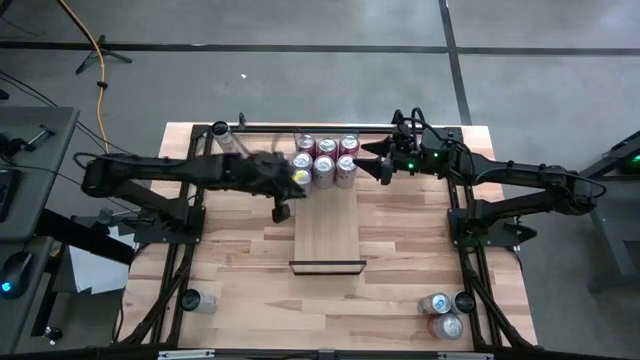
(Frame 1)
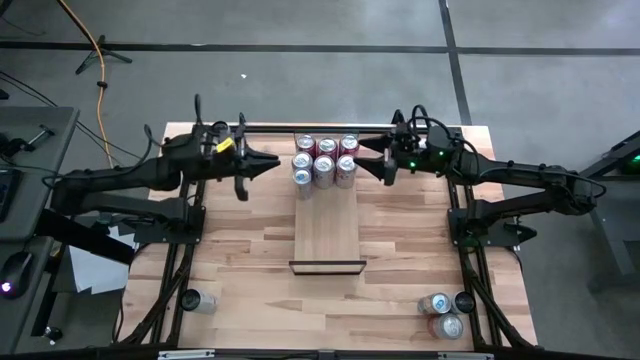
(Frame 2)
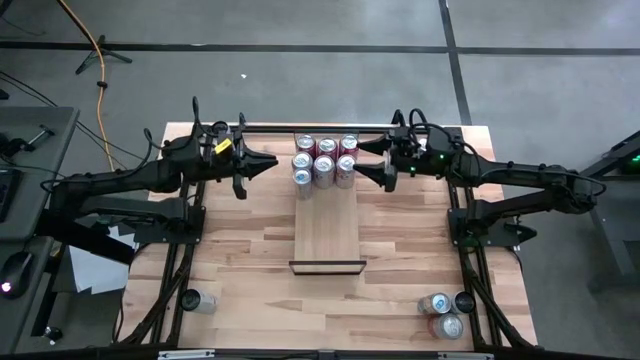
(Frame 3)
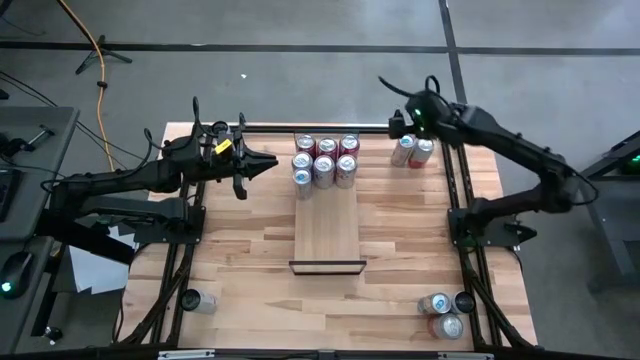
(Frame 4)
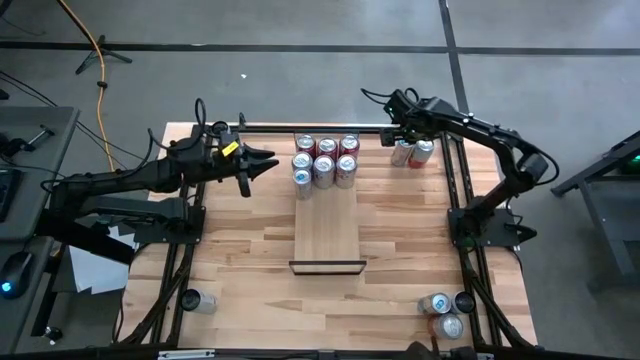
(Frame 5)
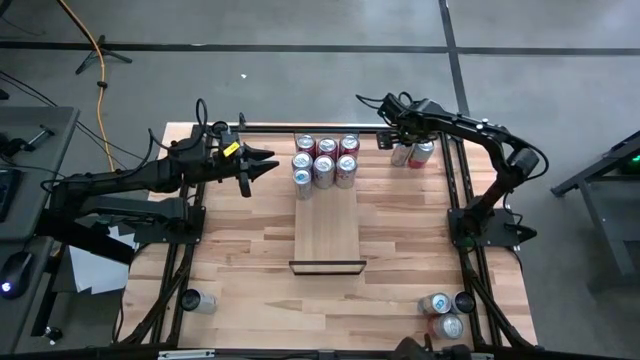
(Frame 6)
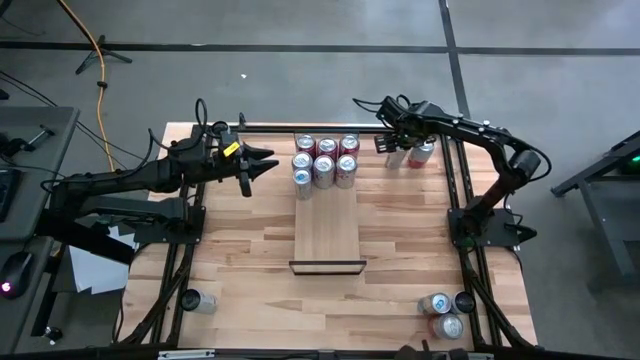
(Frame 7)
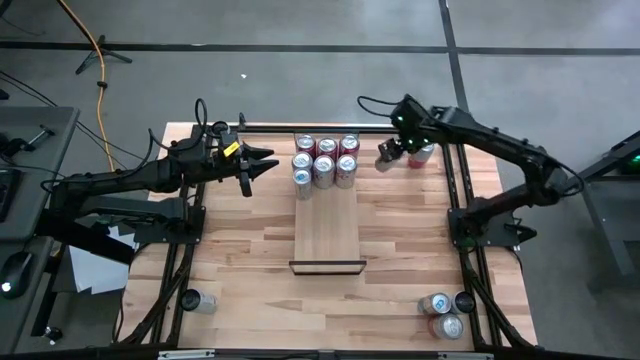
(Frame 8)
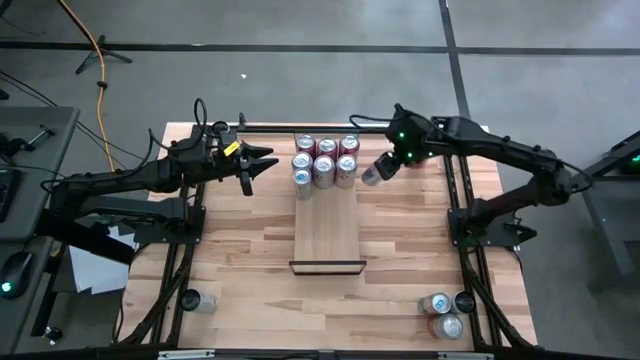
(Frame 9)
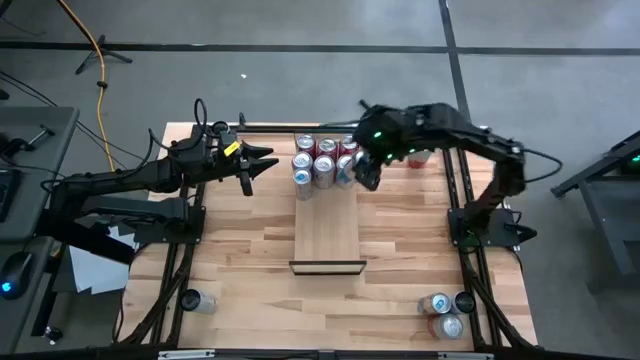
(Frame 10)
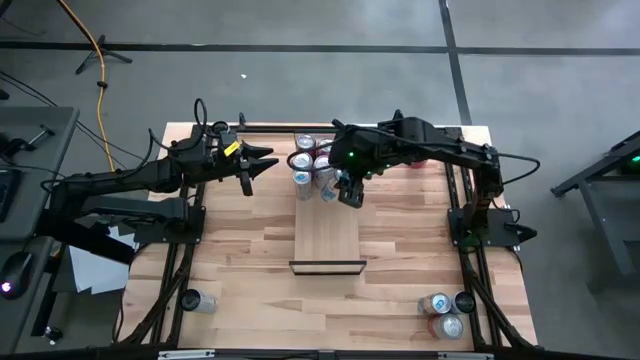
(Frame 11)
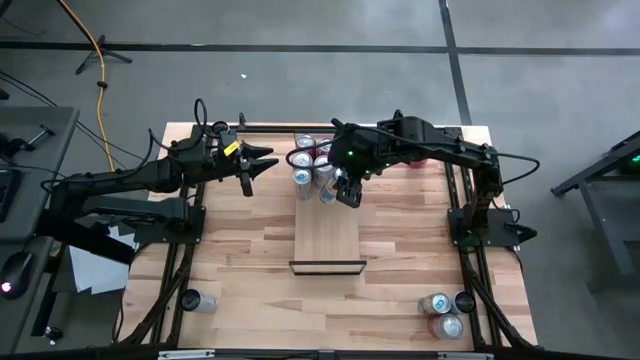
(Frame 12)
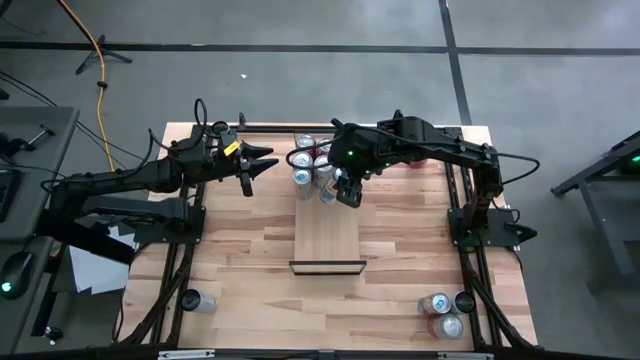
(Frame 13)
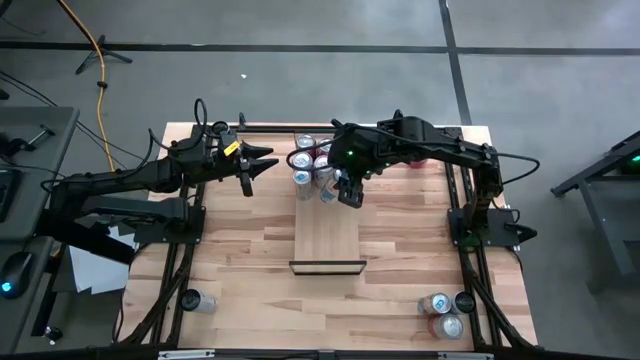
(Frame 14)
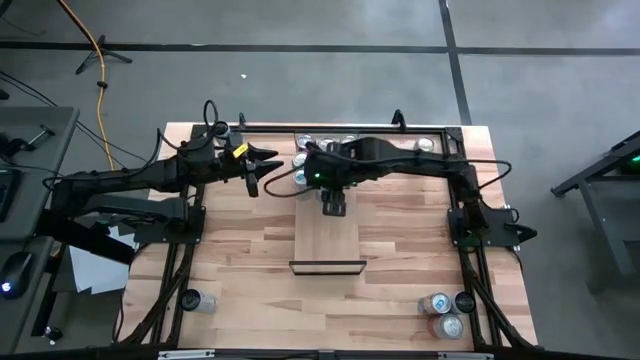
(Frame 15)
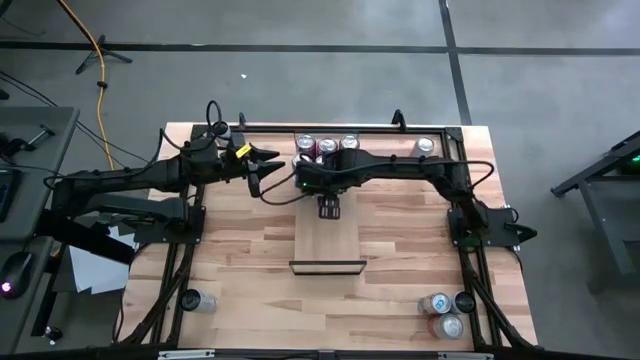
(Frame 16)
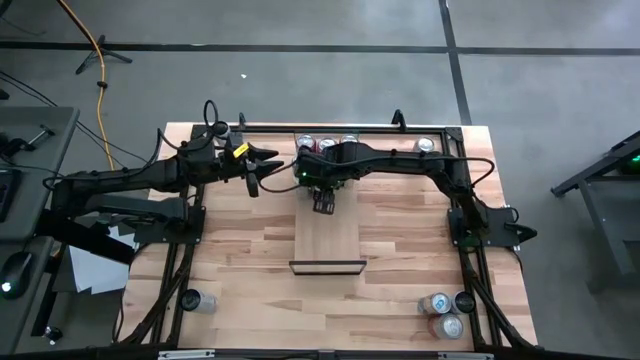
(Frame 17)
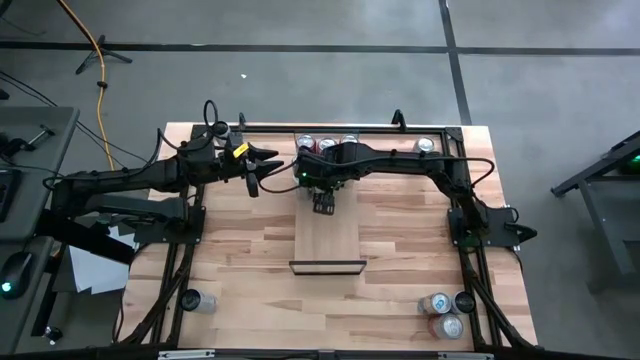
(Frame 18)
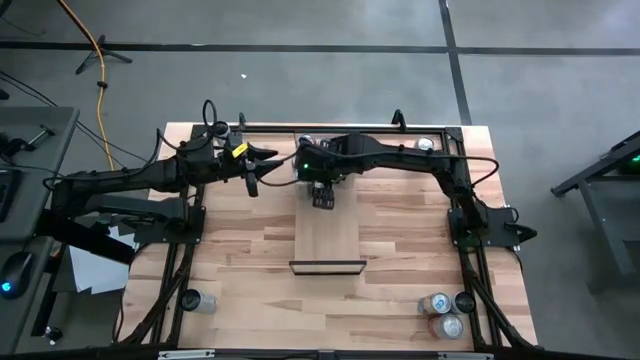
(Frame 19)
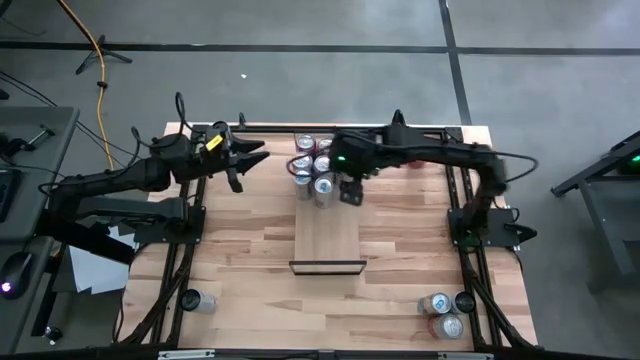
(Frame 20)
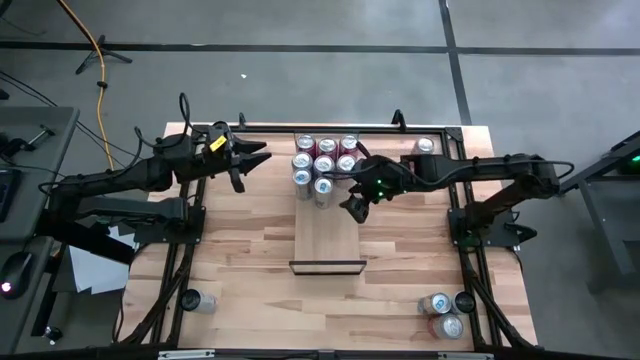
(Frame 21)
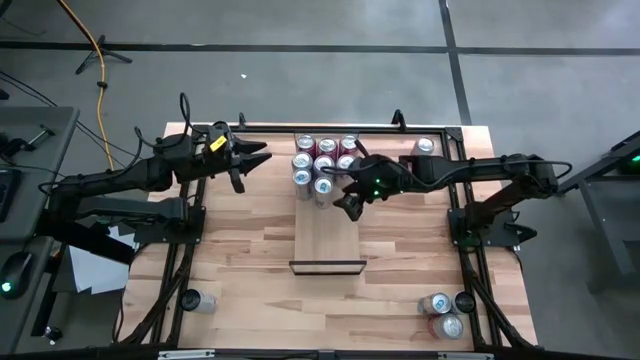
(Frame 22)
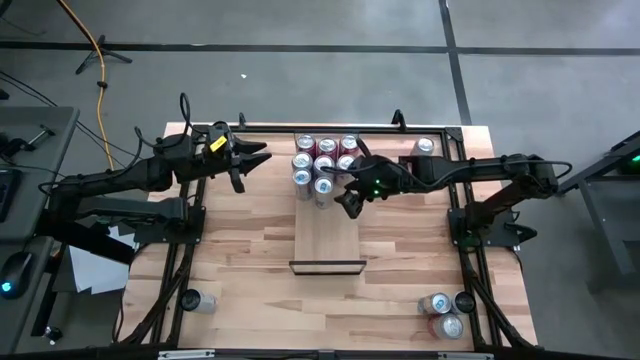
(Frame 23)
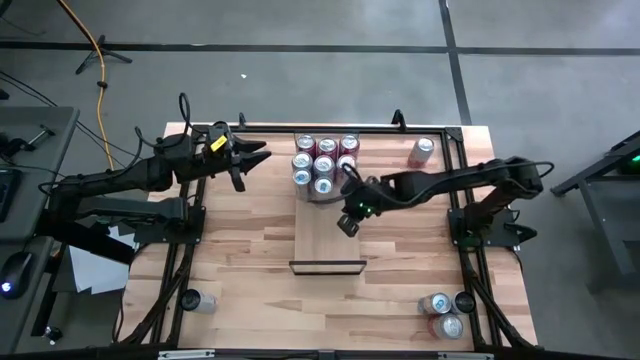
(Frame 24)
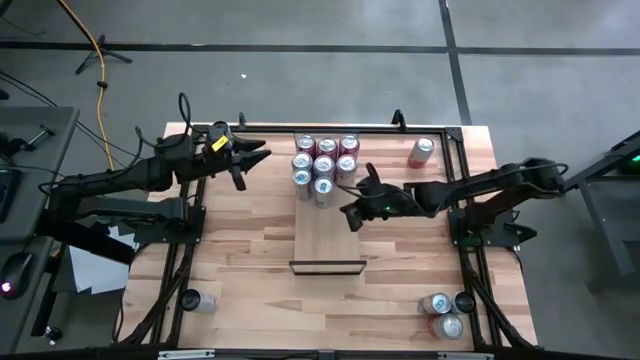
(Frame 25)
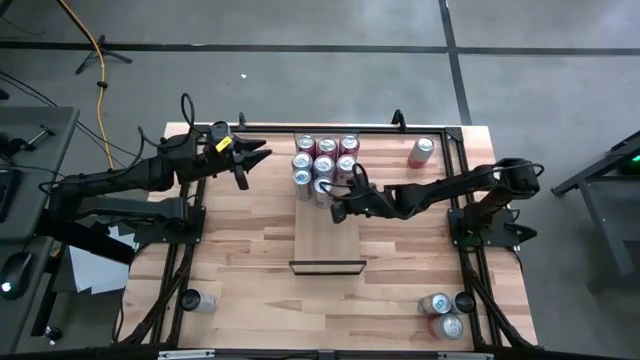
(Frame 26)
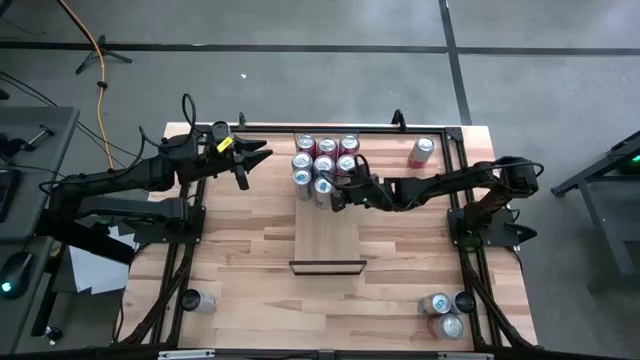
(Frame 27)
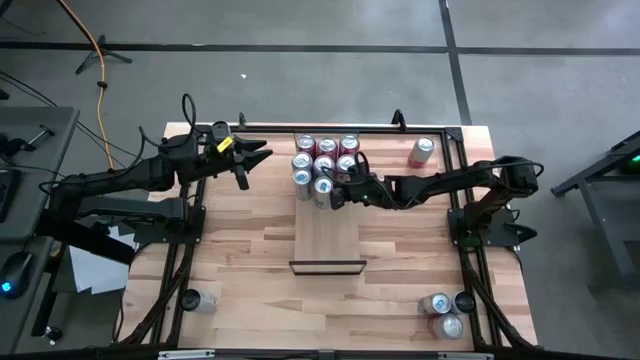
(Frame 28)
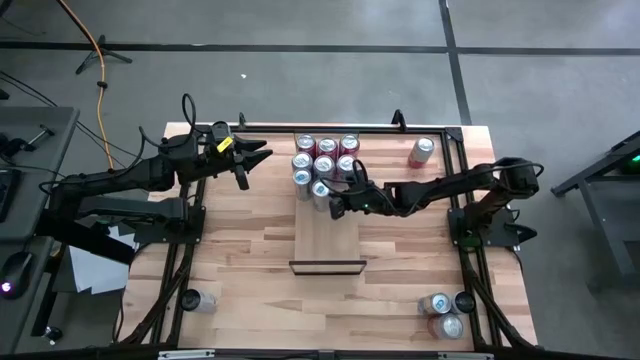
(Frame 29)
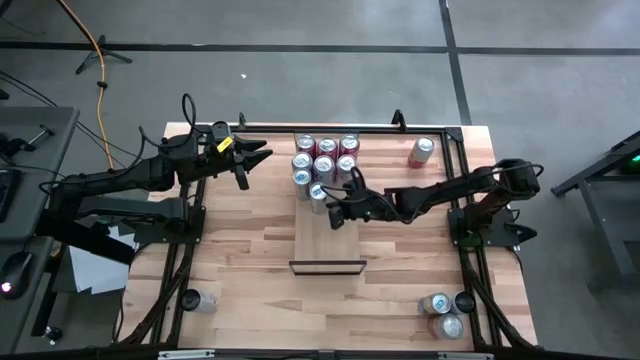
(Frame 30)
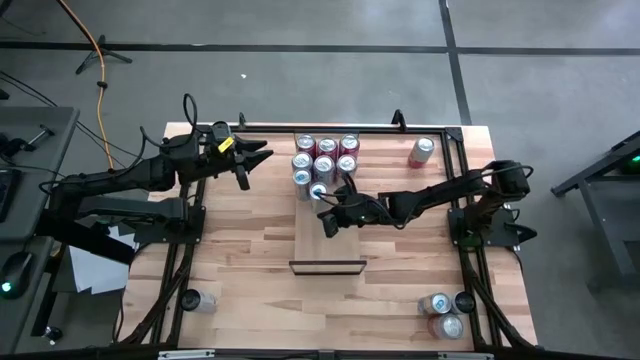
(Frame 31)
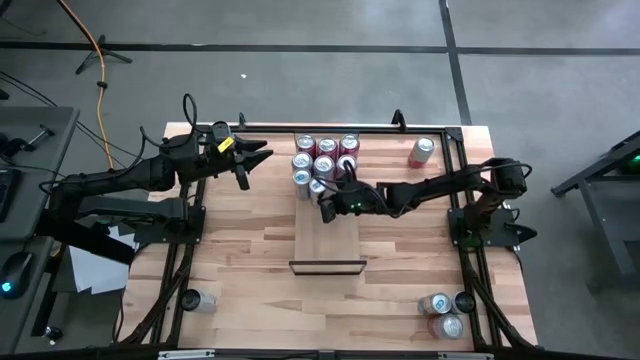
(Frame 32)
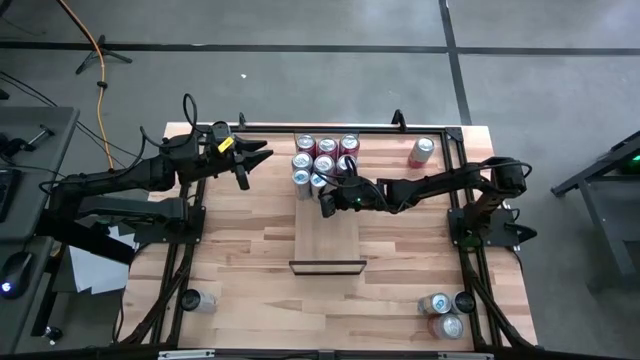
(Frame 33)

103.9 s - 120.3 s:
Task: Place canned beverage on shelf
Put the top blue soda can on the shelf aligned with the other blue soda can

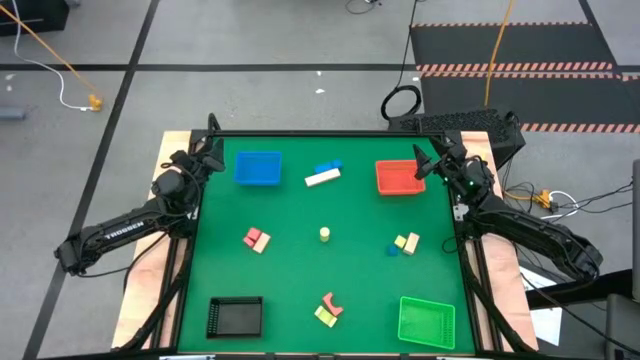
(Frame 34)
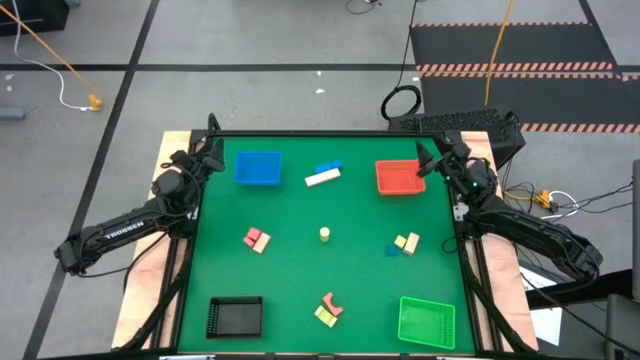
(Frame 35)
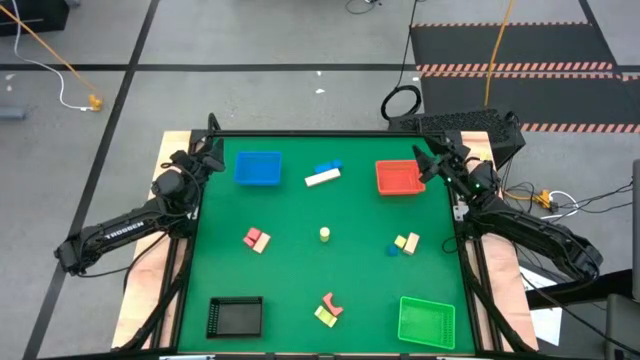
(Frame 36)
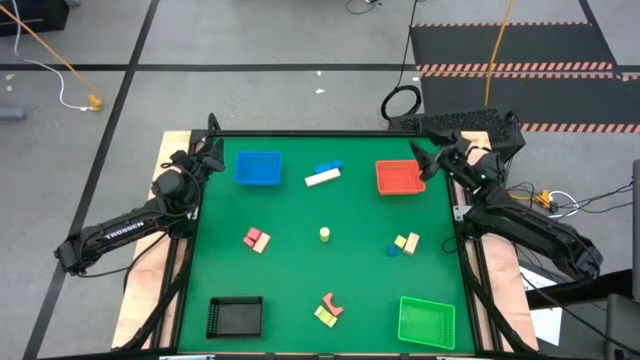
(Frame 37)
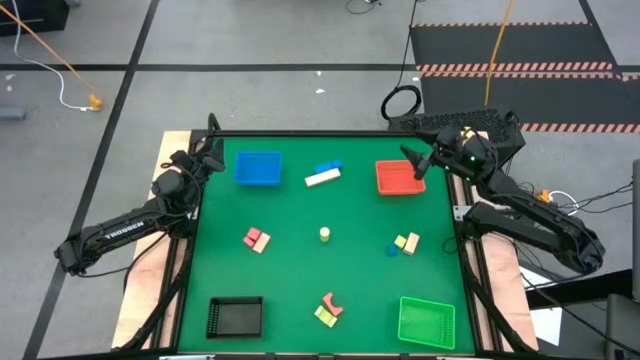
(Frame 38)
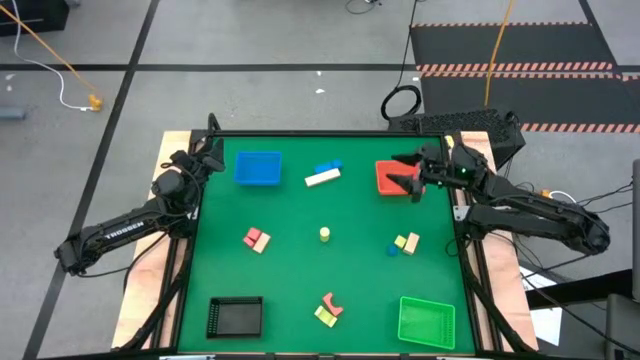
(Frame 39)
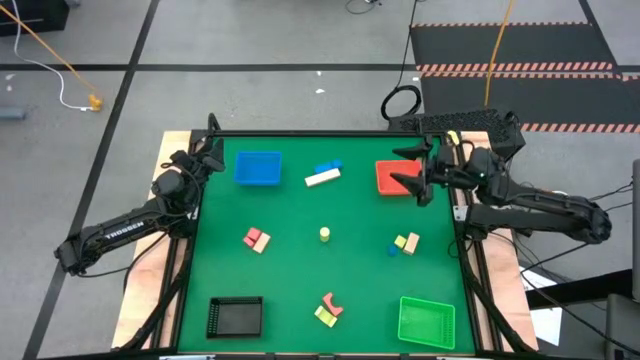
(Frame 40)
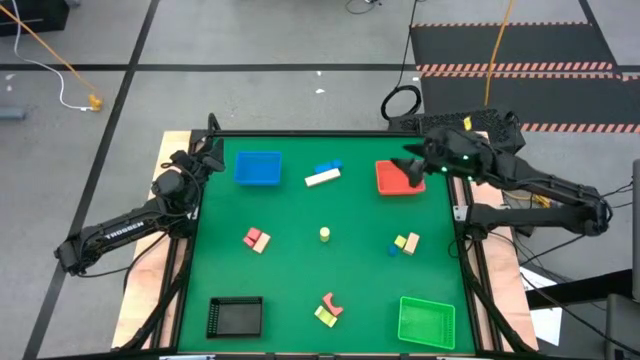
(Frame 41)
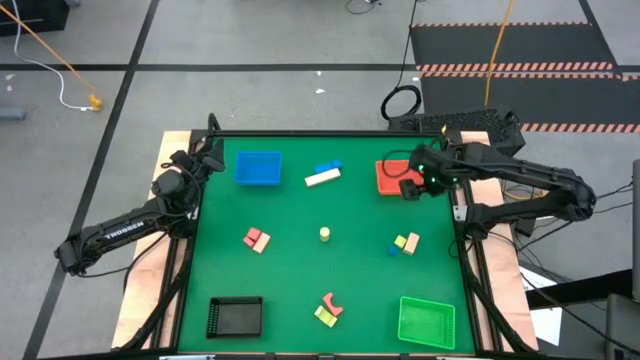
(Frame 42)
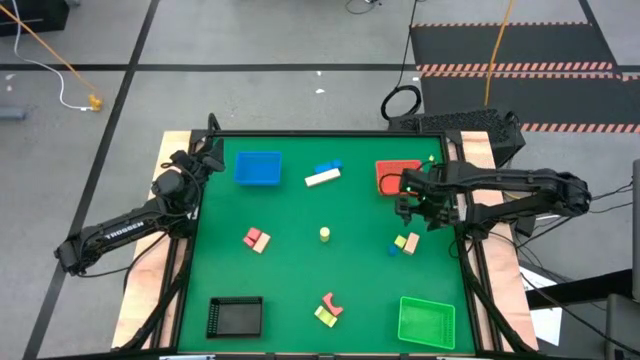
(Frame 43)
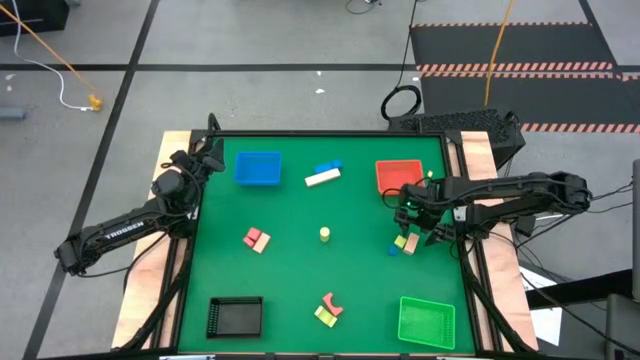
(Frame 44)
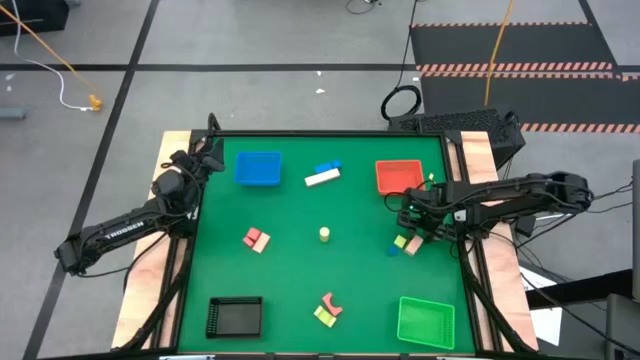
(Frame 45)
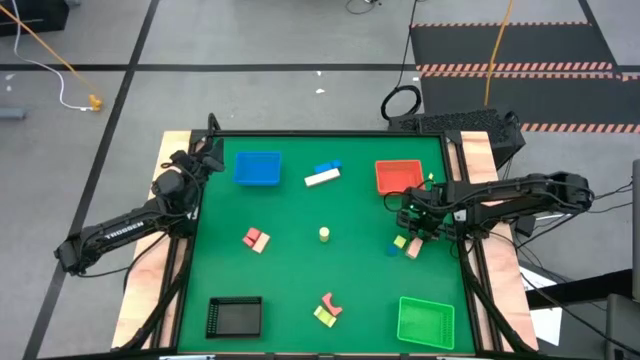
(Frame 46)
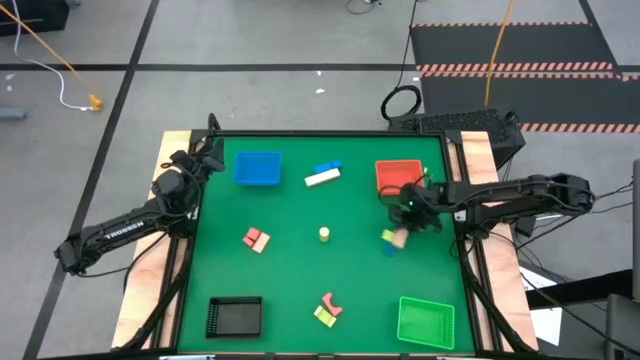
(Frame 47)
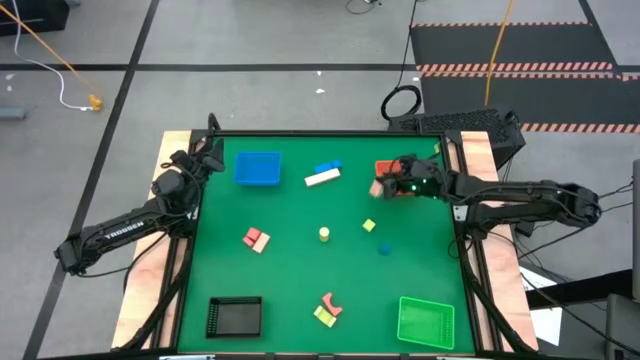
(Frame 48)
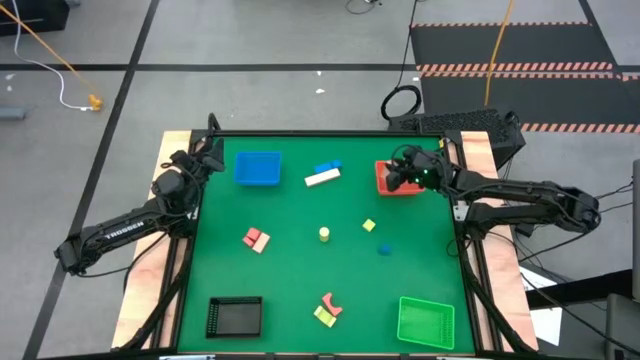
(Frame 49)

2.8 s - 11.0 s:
Task: Sort & place blocks by color
Put the right brown block in the orange basket
